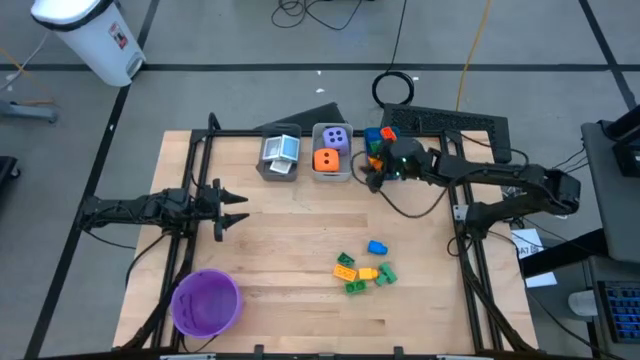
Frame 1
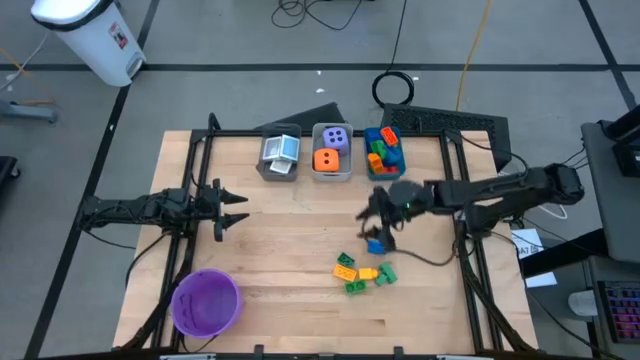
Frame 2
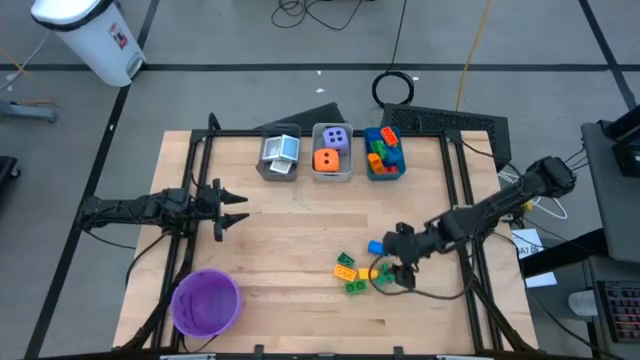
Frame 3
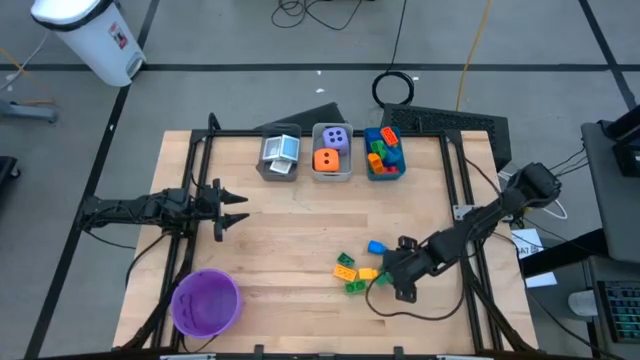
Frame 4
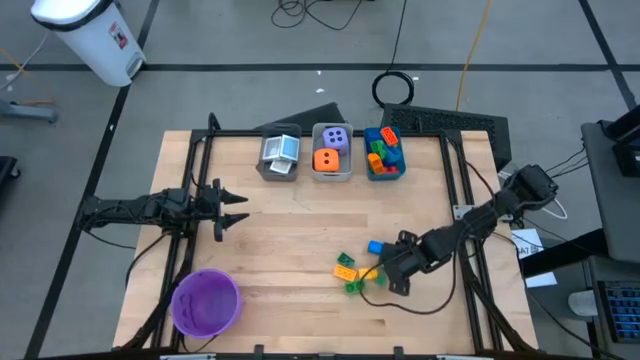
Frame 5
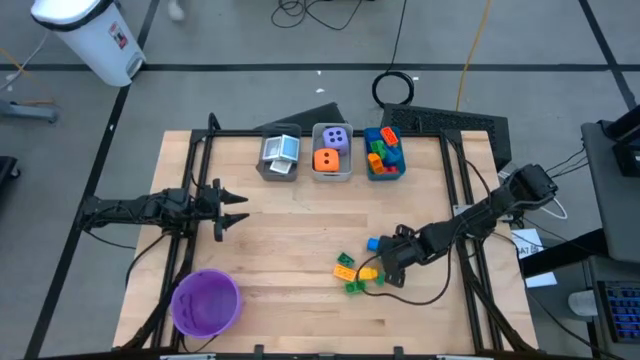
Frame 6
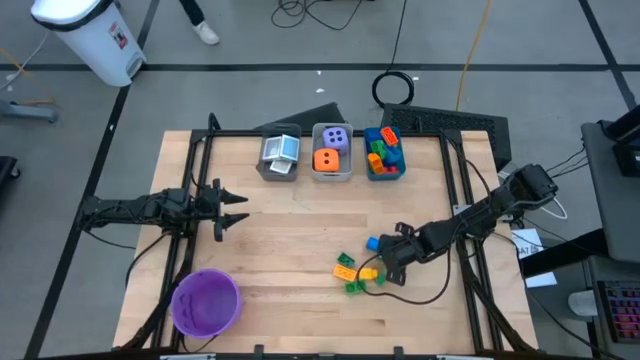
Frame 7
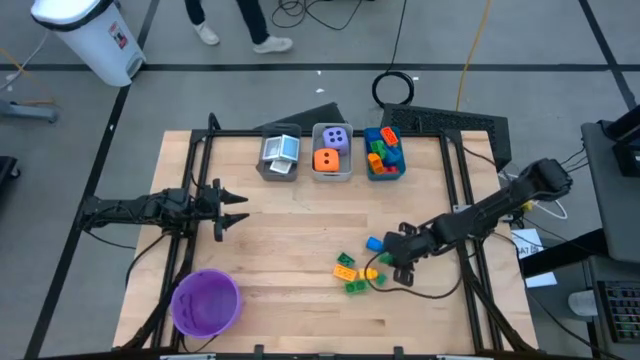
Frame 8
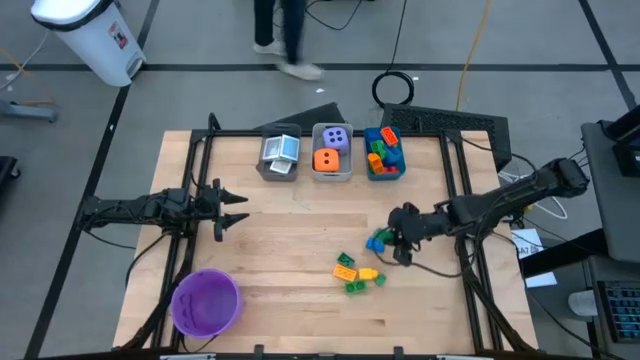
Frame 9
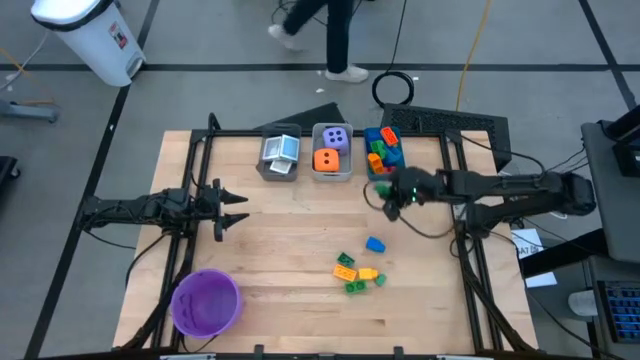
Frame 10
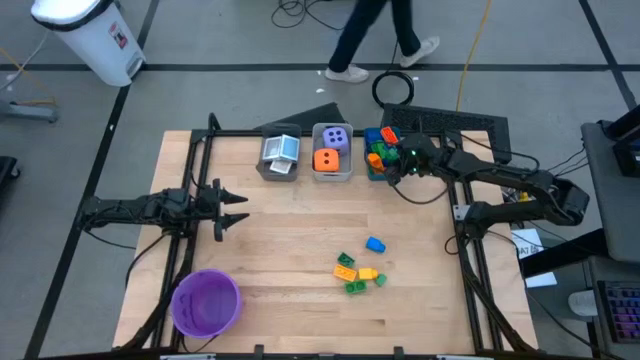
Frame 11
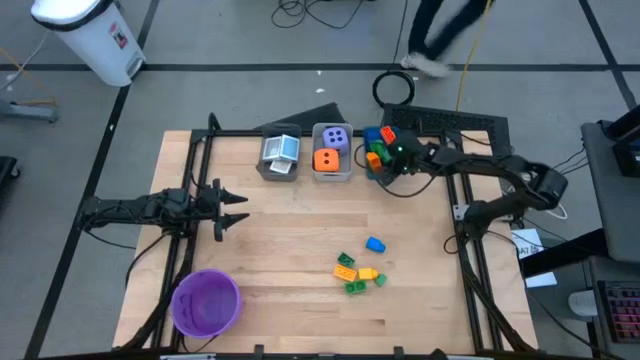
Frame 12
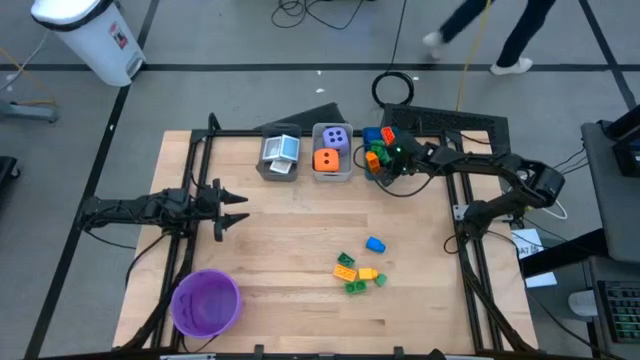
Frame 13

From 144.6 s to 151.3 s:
Task: Pick & Place Toys
Put the green game piece into the blue bin

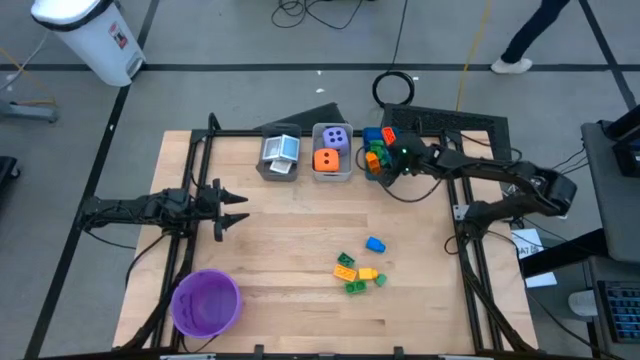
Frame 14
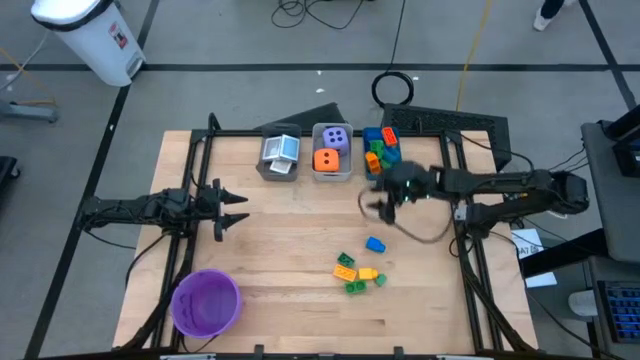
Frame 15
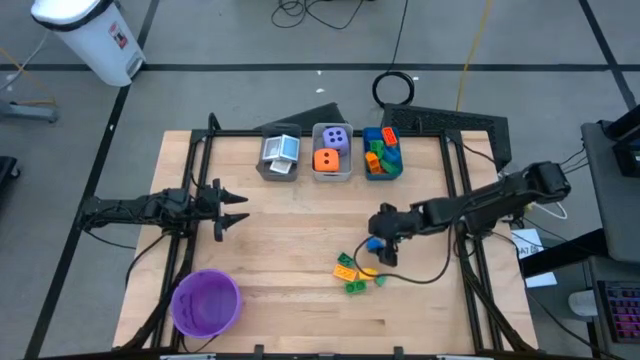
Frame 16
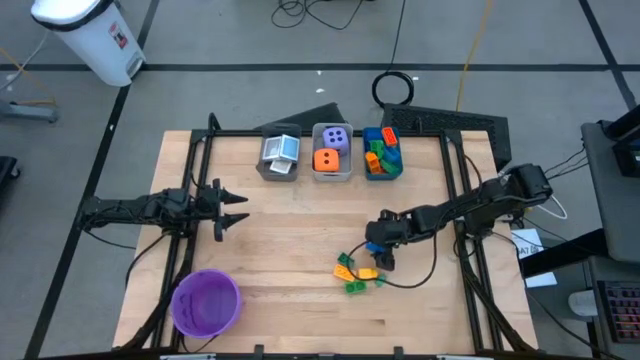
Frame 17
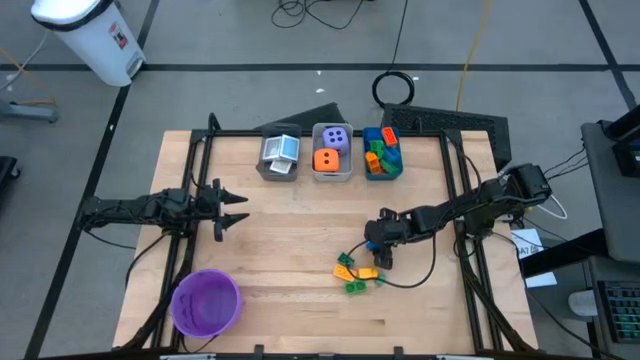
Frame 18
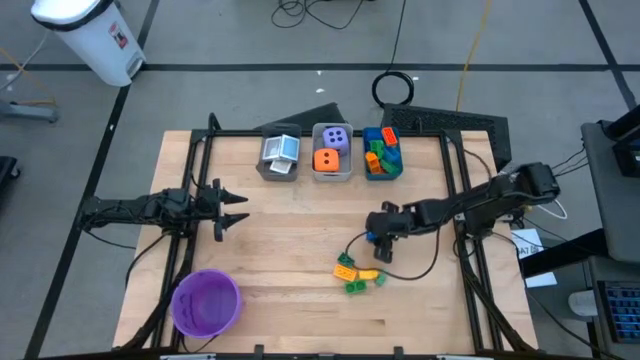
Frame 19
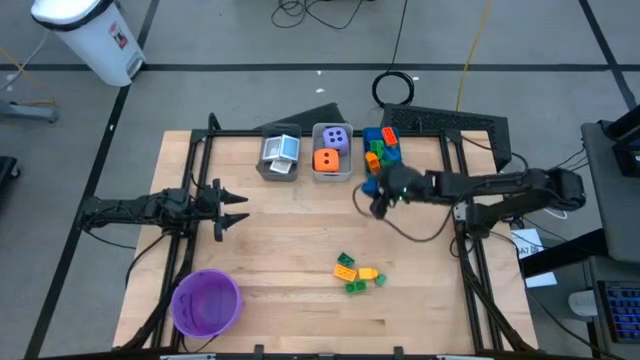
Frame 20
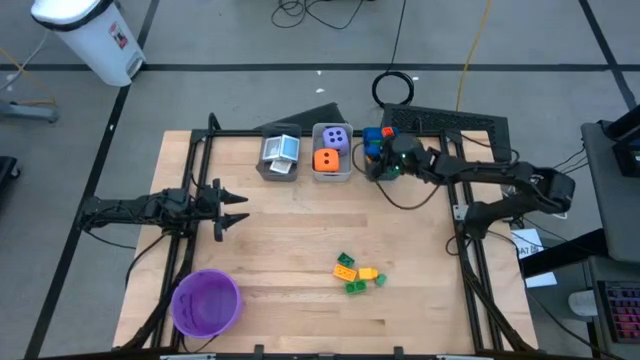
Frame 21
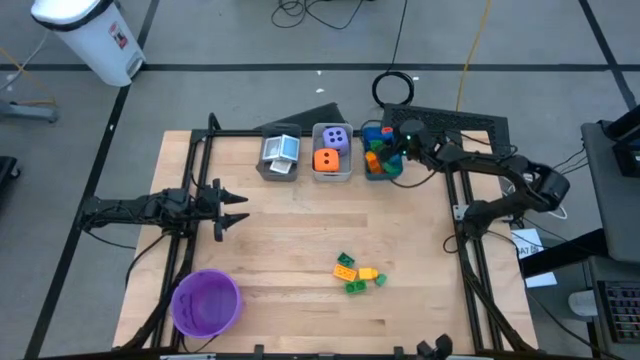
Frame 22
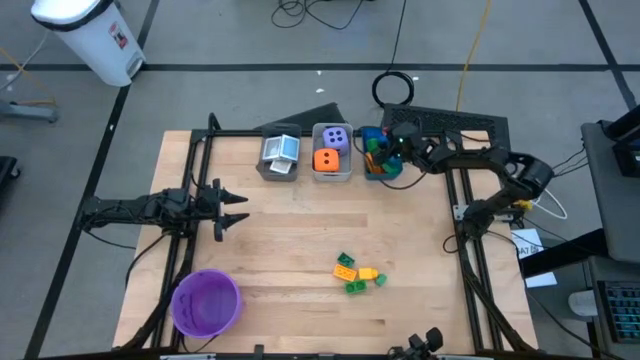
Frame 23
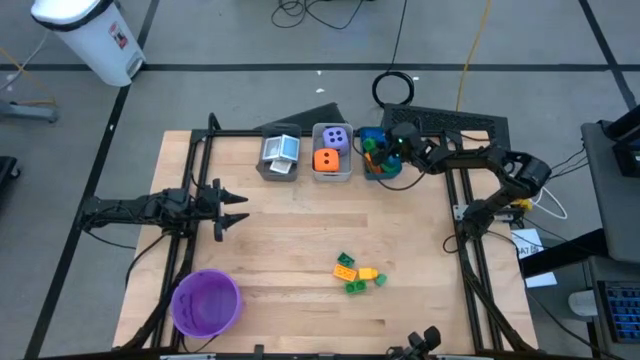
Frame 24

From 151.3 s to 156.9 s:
Put the blue game piece into the blue bin

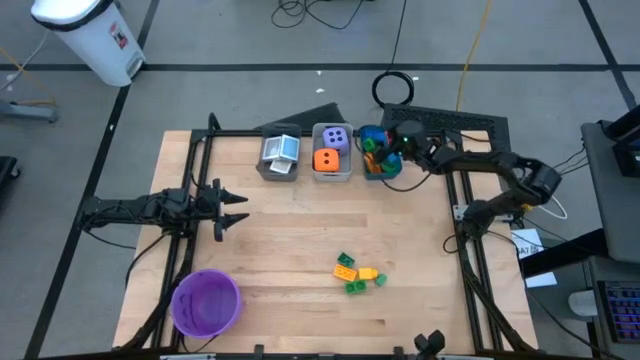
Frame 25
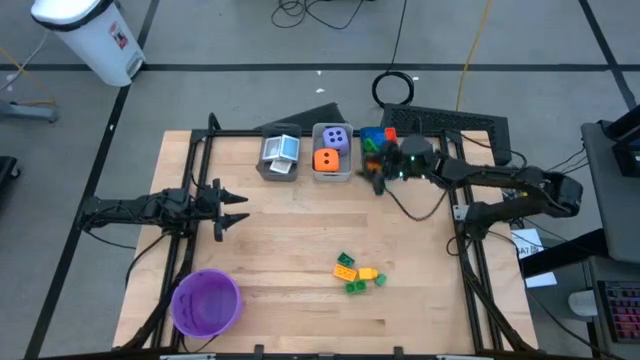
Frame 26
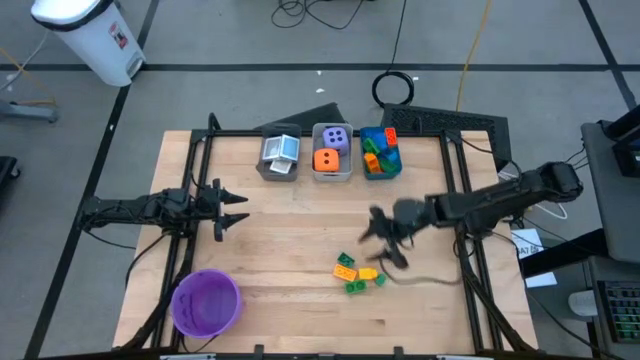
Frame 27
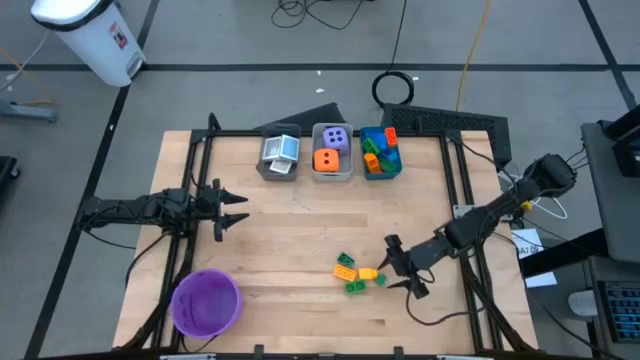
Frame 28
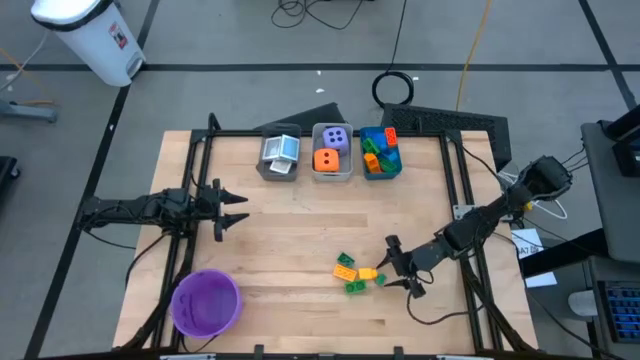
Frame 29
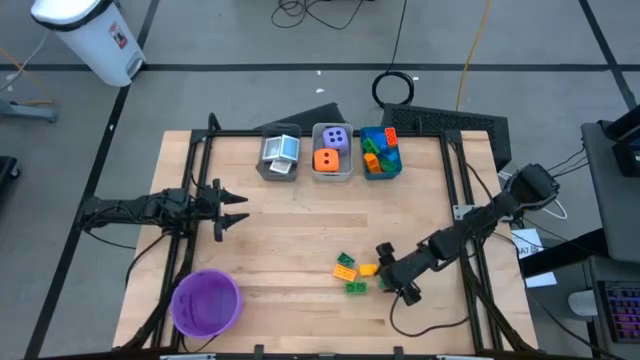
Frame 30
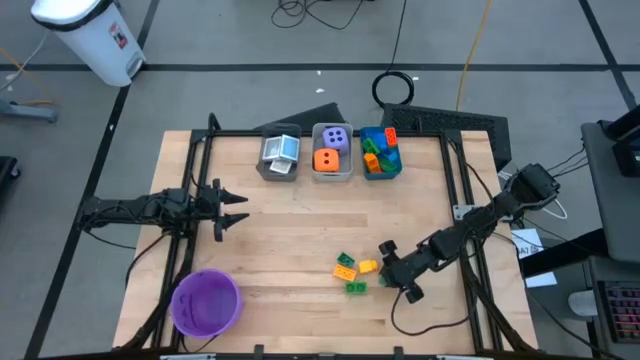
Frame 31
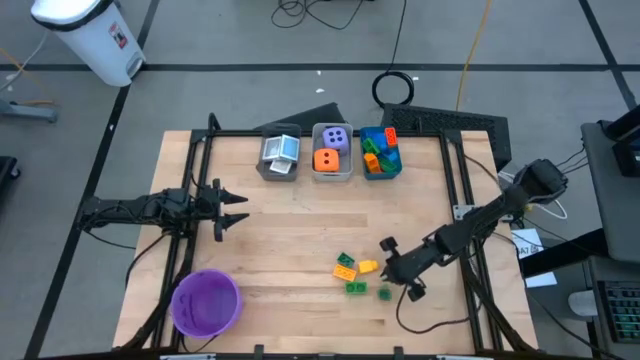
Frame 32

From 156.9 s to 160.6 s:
Put the green game piece into the blue bin

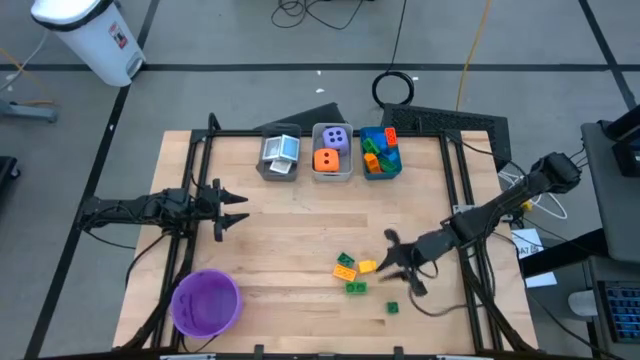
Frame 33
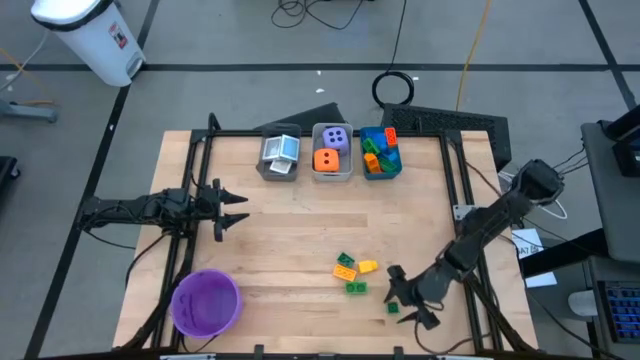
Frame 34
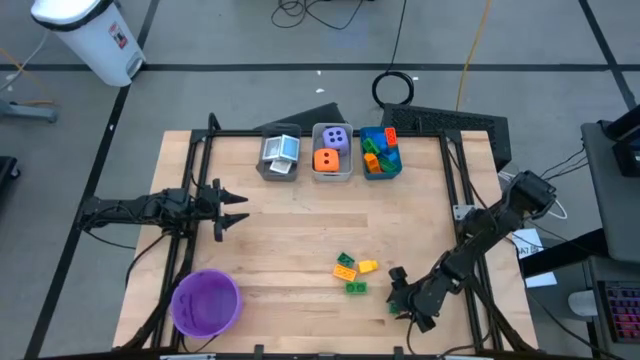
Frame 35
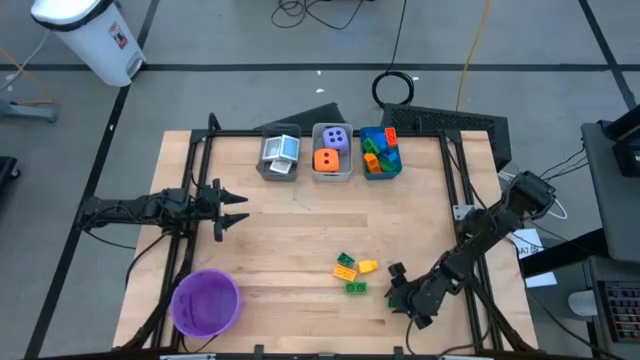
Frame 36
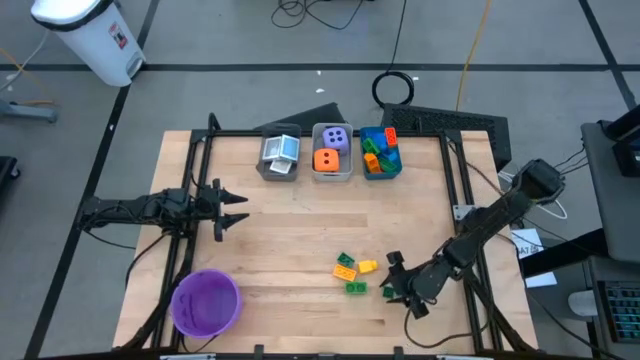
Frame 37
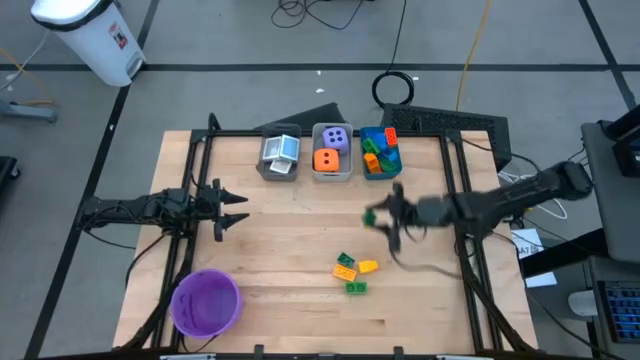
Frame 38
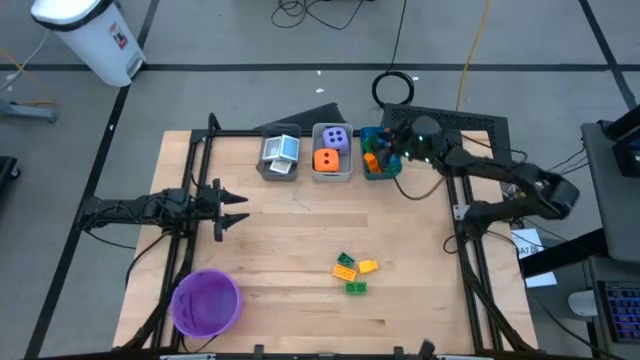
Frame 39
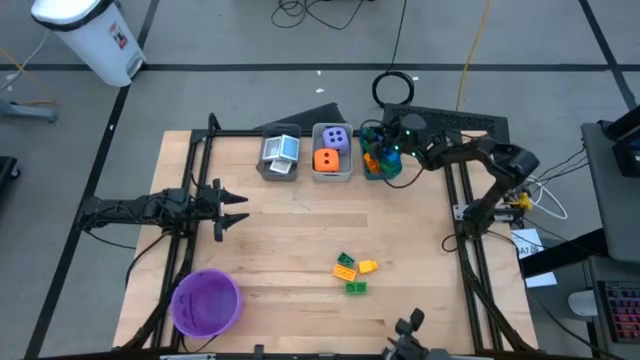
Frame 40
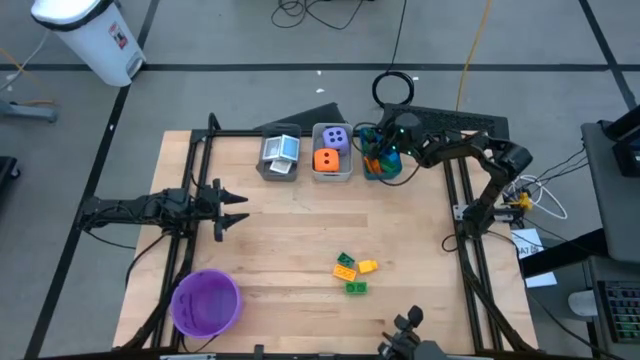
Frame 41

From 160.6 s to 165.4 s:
Put the green game piece into the blue bin
